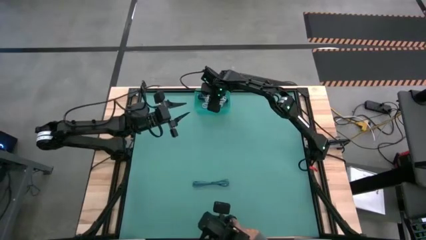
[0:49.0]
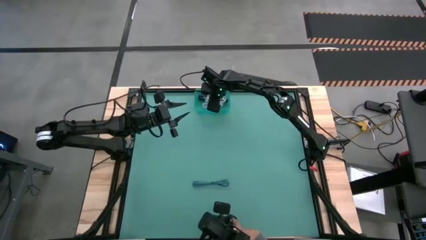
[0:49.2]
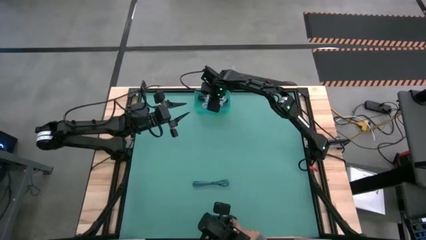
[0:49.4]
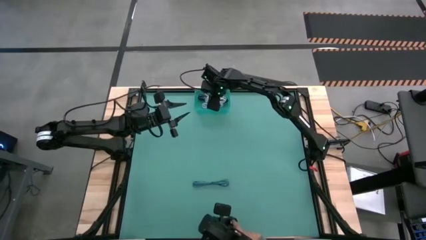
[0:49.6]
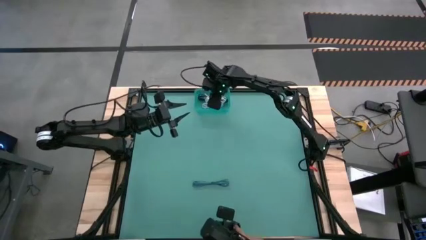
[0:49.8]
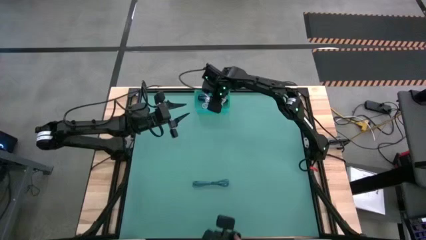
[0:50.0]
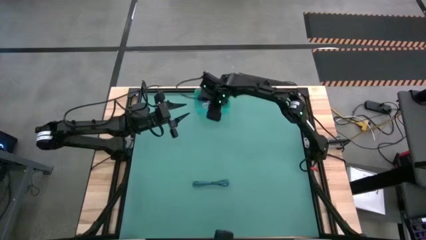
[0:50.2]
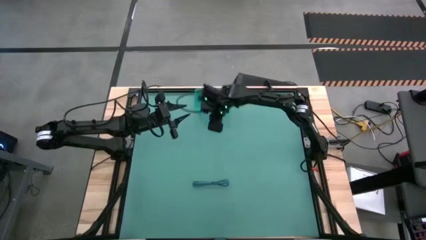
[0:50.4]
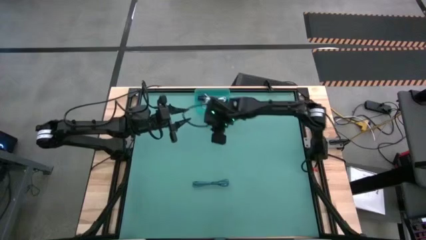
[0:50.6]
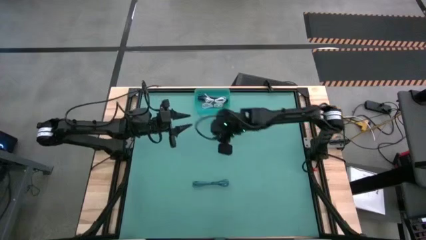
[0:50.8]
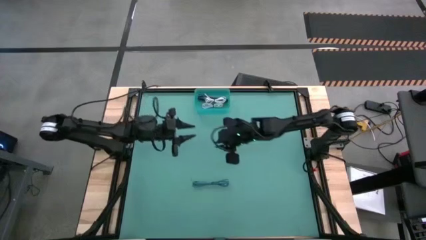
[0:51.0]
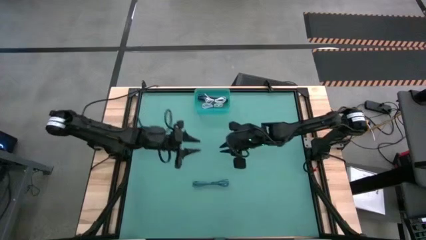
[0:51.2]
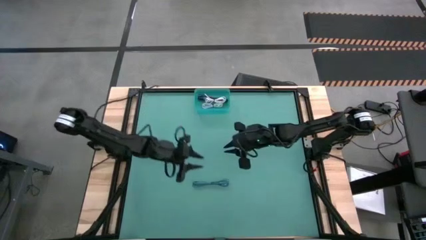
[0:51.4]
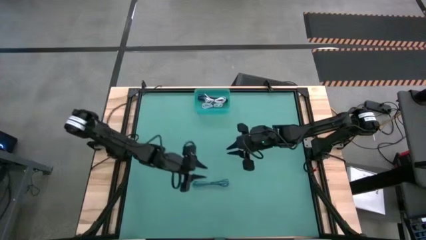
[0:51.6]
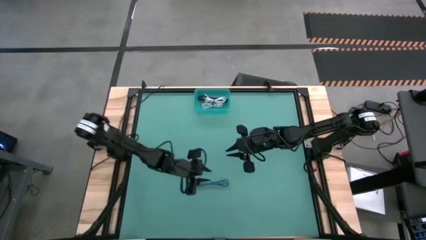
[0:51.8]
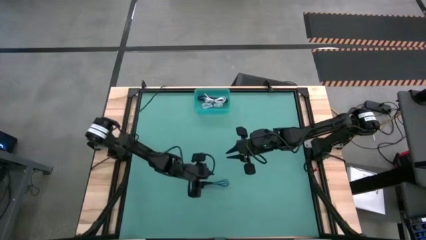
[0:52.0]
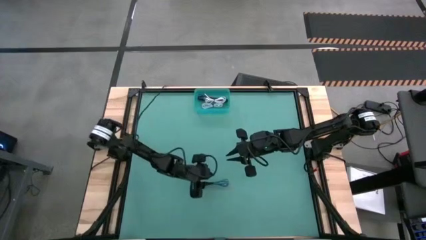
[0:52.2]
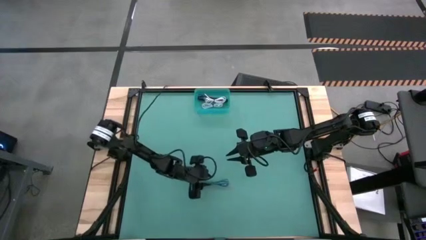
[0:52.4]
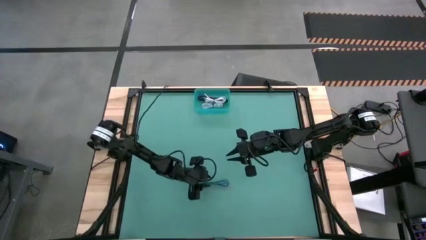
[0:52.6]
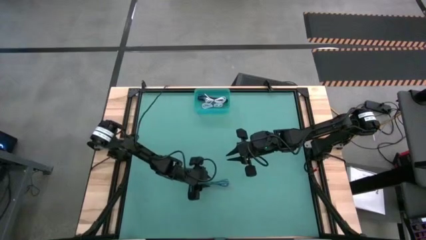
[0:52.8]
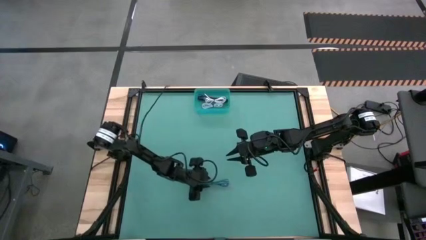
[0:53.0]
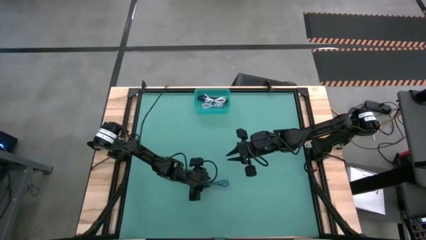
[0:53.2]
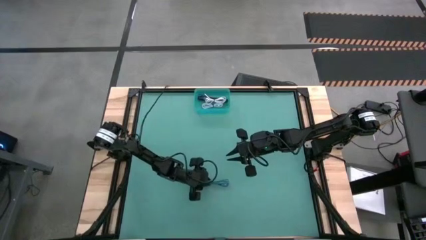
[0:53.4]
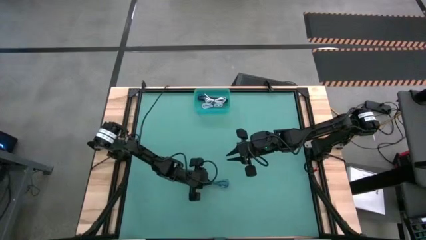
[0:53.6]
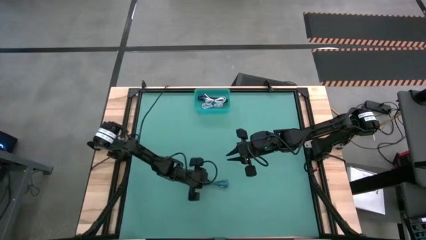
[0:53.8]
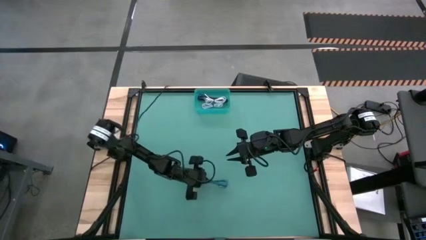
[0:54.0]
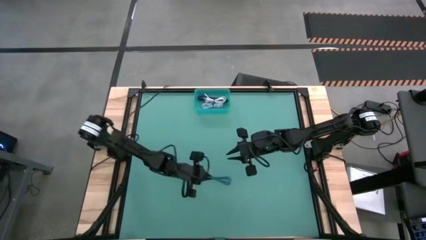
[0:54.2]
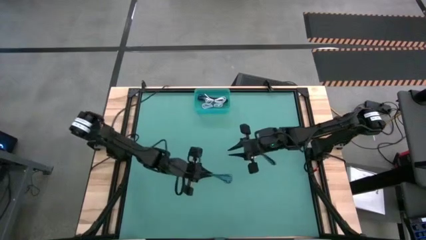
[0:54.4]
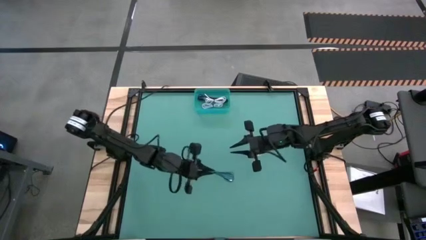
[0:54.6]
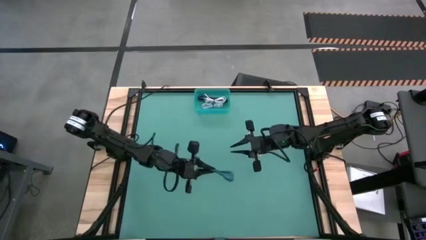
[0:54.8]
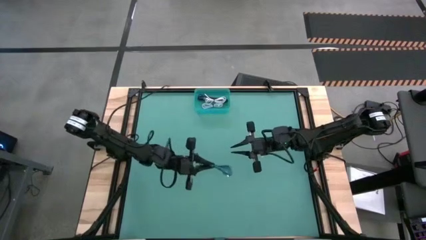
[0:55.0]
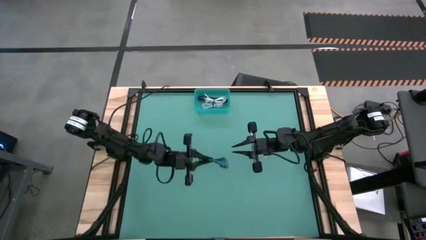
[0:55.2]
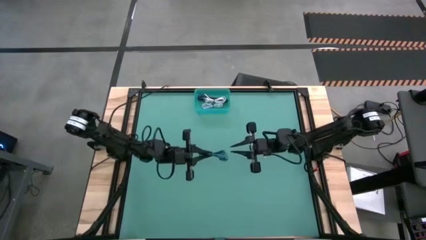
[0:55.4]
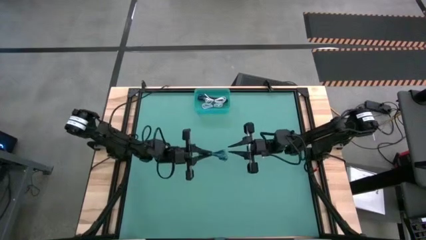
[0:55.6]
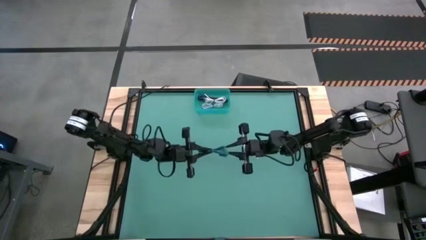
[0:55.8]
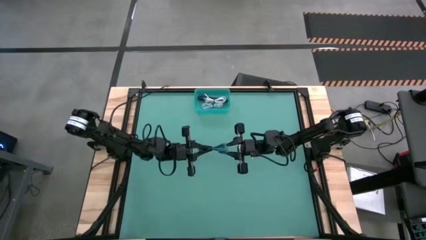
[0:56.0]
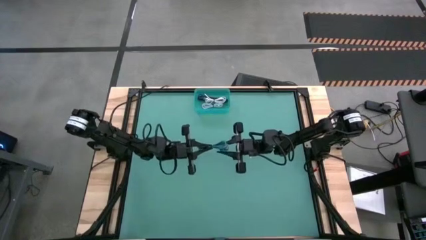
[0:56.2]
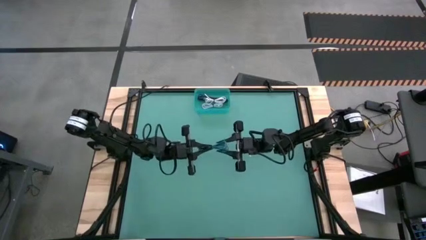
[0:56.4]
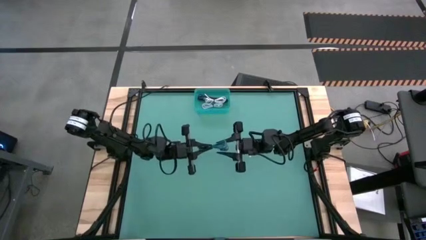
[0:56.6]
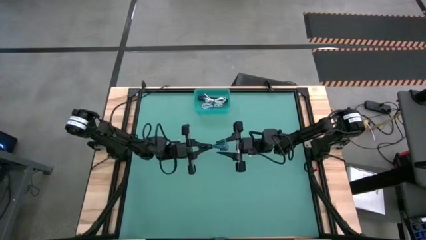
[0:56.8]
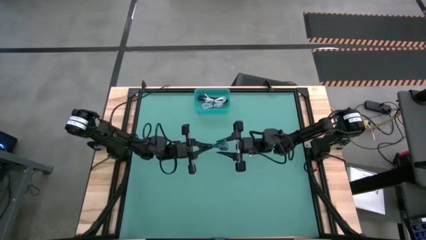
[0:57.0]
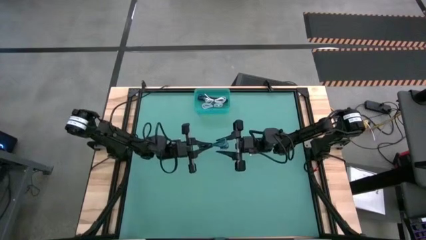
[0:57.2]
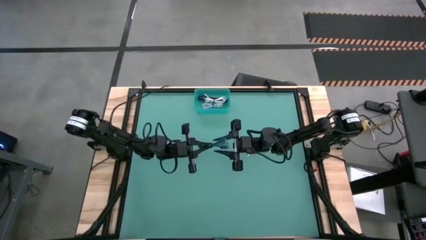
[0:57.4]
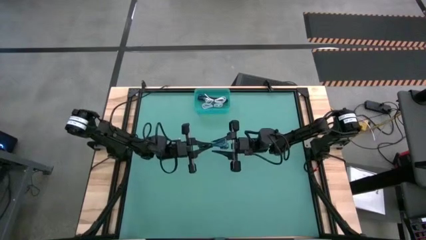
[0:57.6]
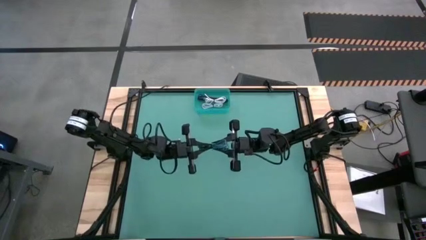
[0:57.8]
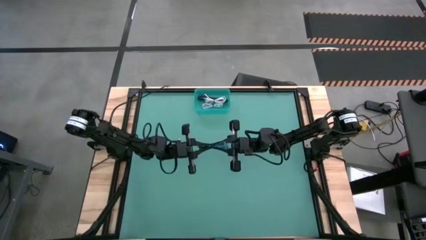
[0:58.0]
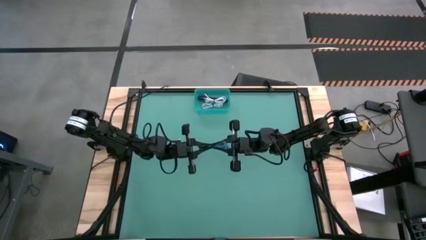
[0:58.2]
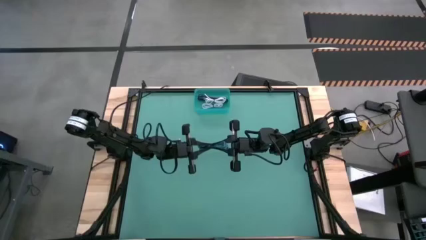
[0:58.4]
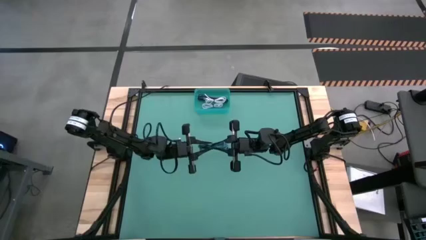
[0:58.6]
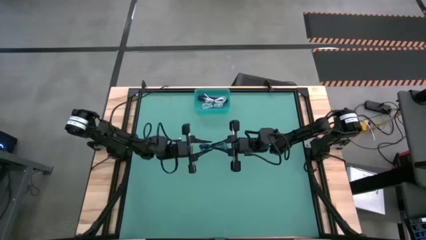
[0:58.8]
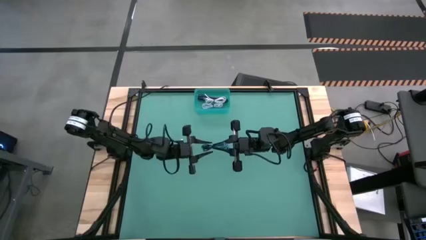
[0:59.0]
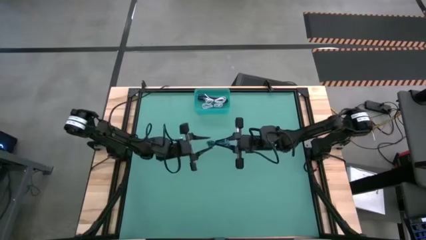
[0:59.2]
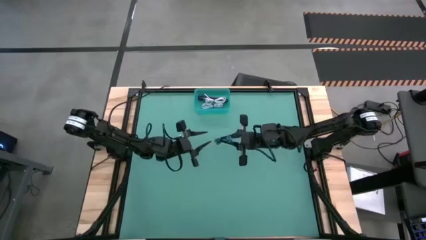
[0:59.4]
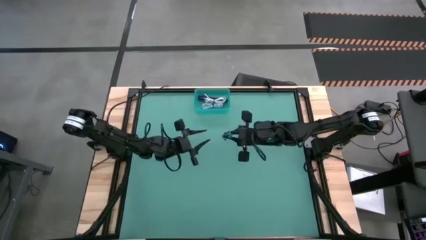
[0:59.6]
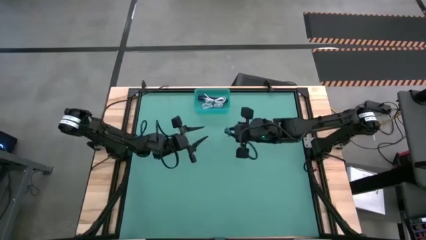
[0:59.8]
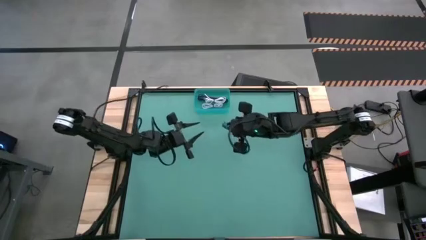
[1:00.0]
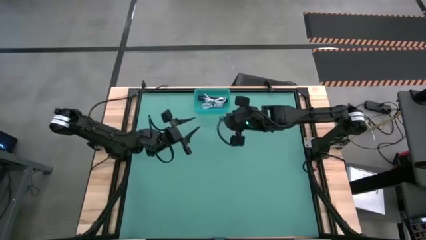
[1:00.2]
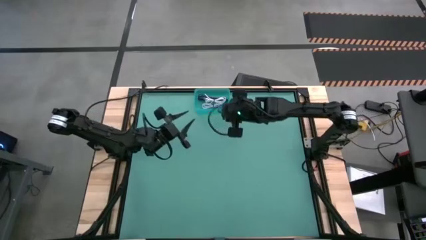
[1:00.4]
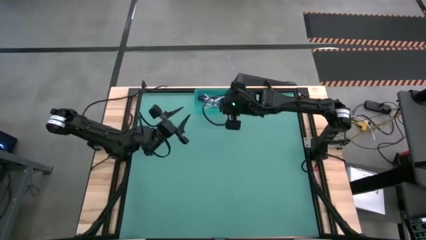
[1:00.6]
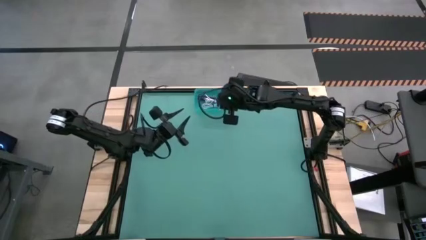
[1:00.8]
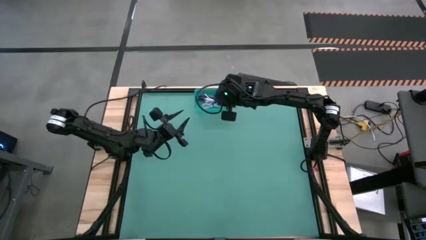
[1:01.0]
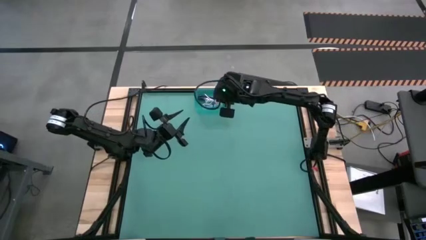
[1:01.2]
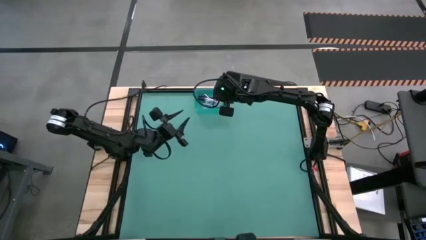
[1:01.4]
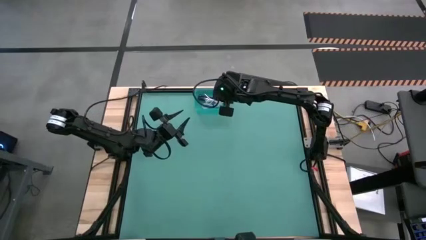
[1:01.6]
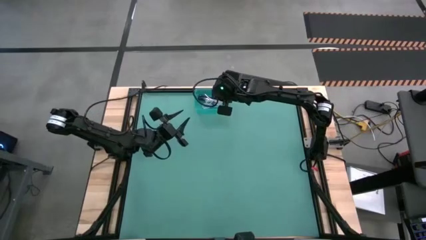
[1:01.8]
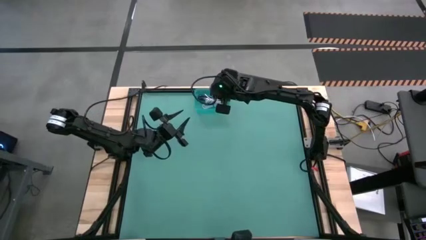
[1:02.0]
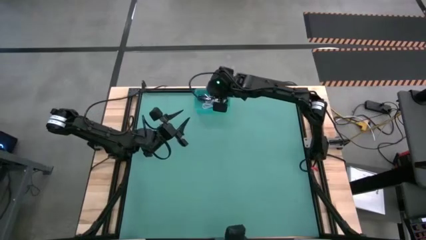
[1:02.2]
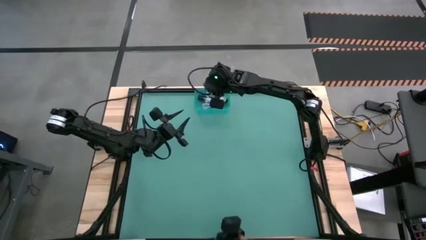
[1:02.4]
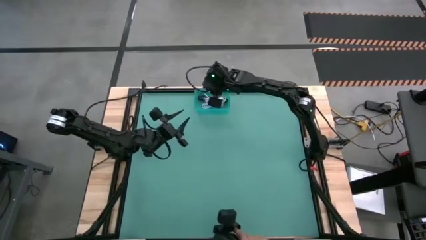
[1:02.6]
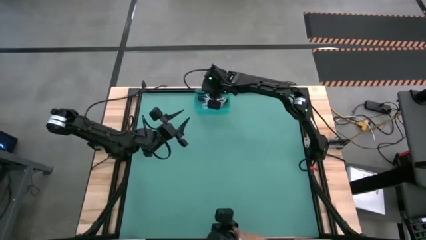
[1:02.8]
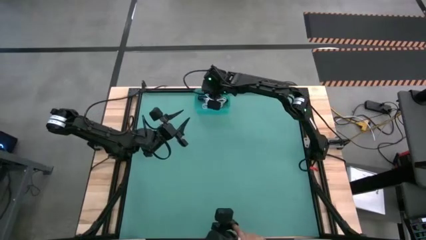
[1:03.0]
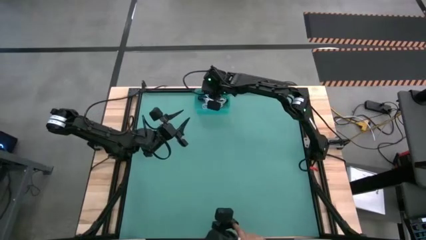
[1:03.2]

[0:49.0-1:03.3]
Task: Pick and place USB-C Cables
Put the blue charger cable into the green bin
